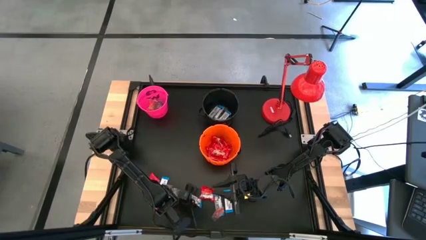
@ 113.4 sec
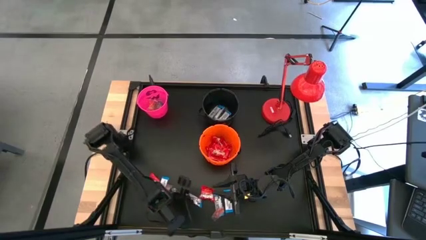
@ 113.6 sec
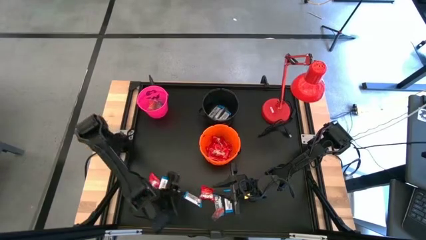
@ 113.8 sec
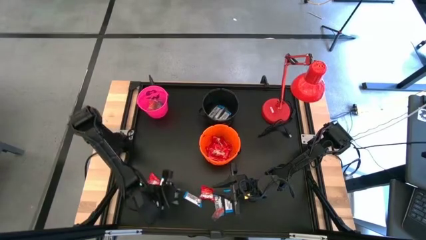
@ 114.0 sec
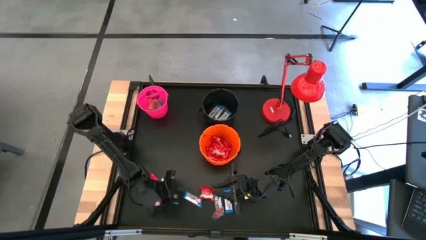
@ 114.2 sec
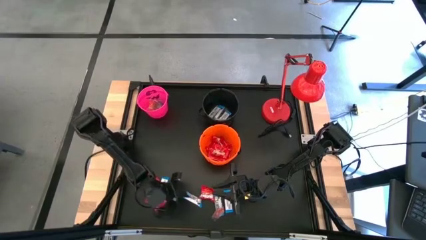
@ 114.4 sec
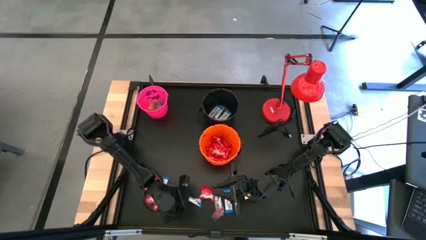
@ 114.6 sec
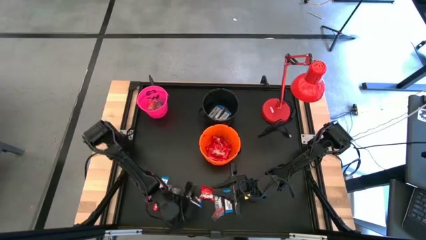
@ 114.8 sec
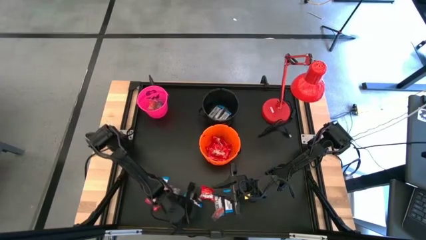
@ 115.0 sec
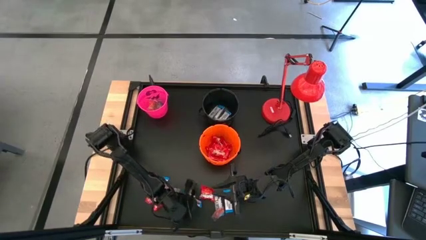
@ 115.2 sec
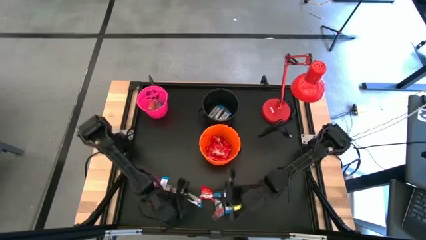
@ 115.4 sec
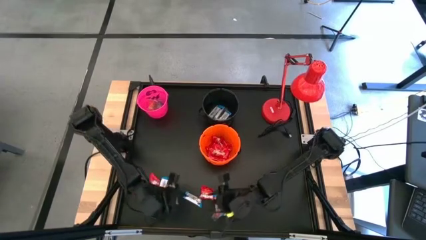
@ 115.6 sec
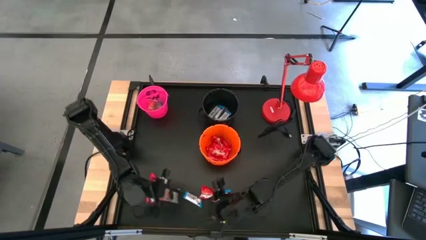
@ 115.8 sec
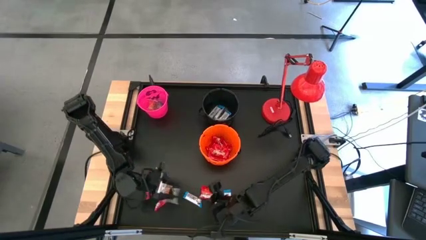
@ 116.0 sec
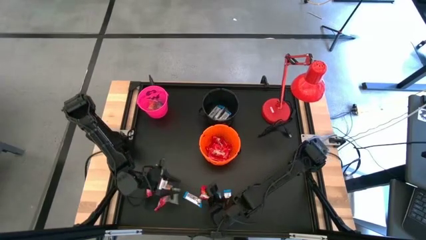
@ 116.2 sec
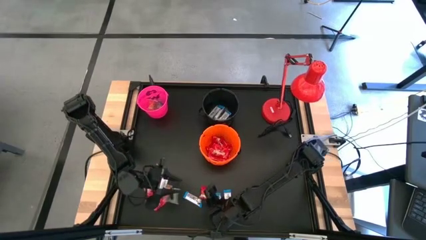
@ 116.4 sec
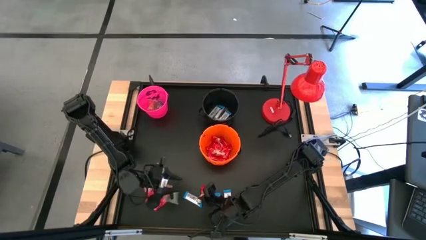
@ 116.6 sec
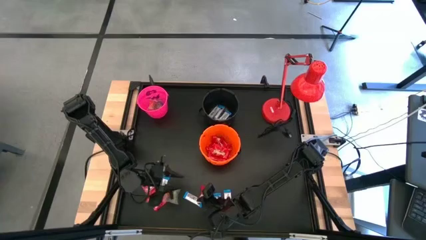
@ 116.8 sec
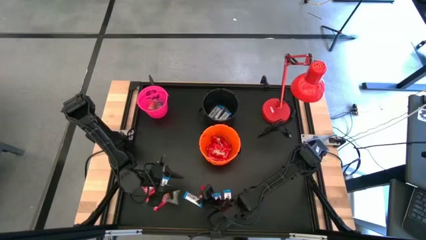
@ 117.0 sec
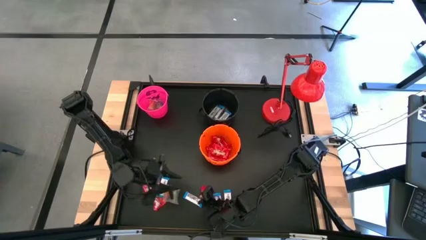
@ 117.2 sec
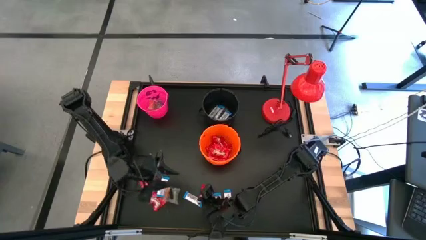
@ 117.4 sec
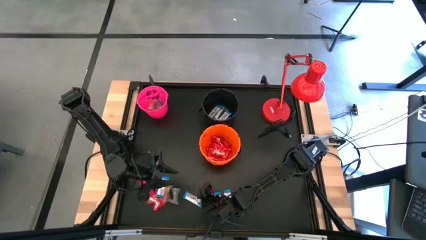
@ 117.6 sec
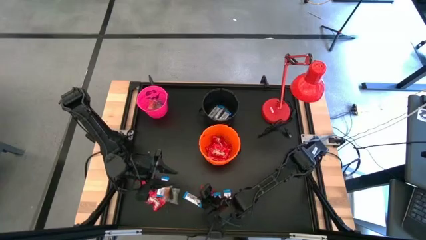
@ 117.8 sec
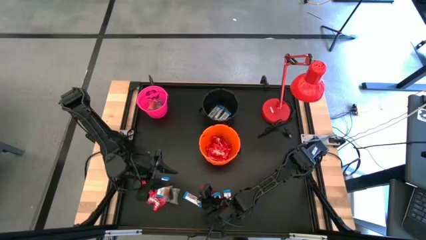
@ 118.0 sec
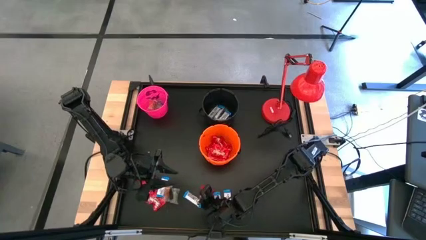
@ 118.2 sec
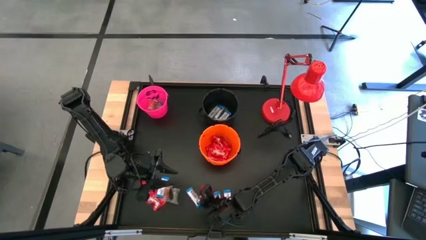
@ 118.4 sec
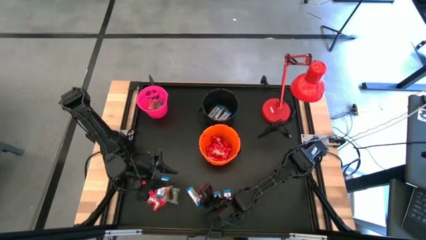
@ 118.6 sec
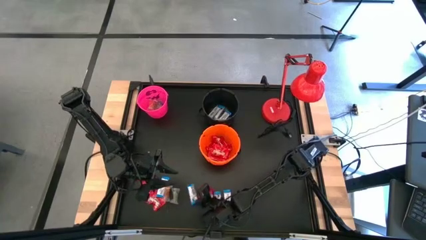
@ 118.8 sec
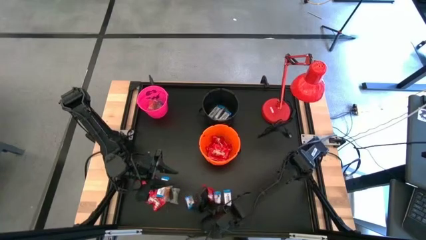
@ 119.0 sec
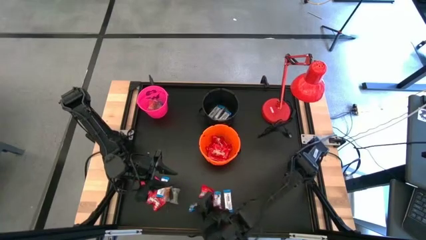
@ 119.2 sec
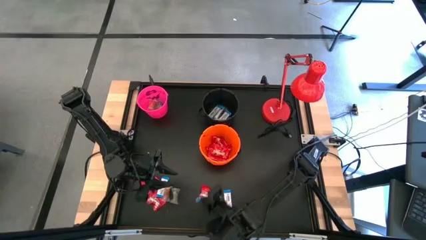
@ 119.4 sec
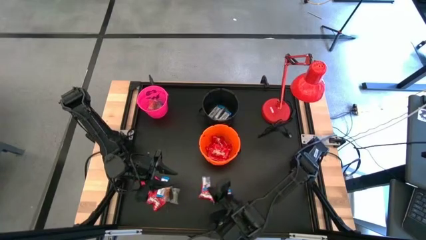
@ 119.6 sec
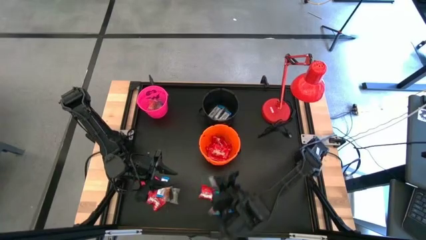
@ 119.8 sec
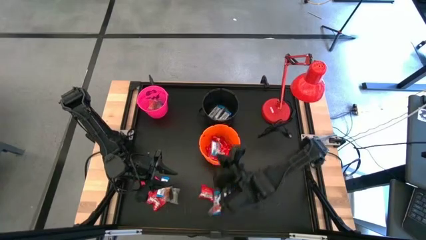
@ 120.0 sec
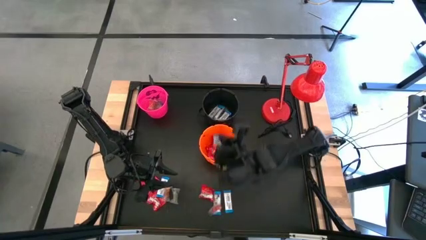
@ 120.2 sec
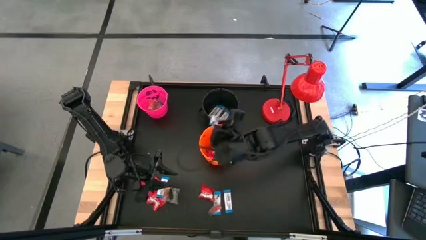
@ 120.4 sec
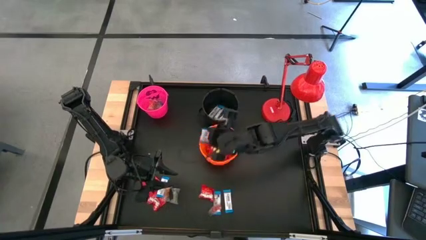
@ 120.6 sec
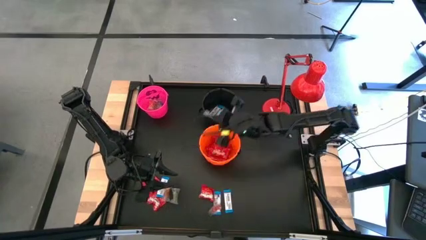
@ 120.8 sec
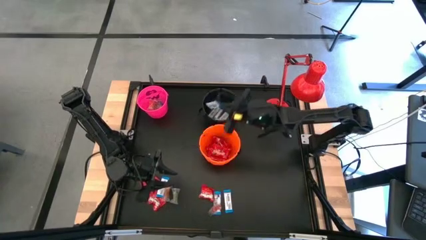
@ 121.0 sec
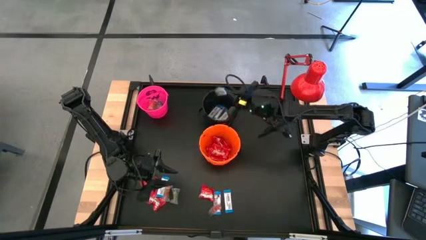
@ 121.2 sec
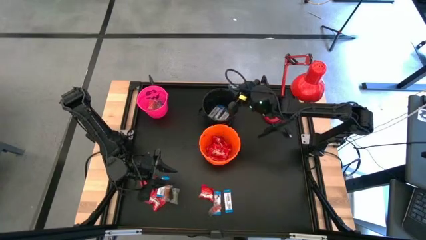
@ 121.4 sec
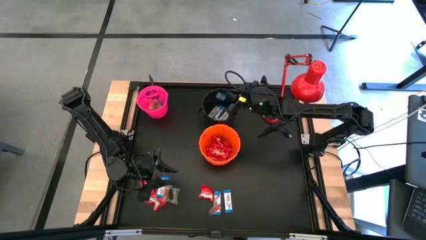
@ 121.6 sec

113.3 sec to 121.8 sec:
Task: Sort candy
Put the white chocolate into the black bucket

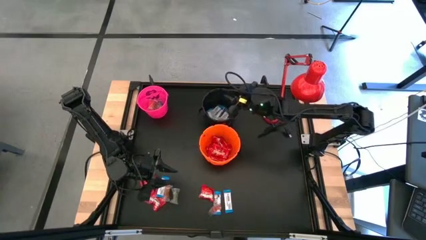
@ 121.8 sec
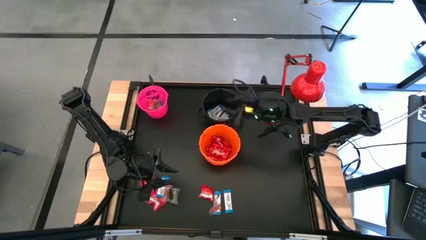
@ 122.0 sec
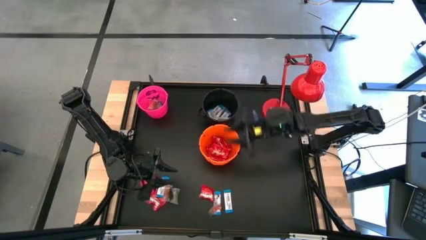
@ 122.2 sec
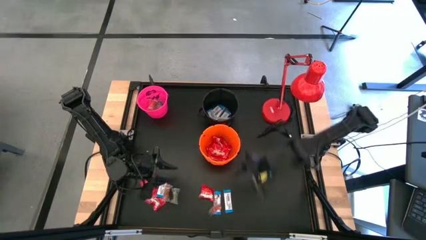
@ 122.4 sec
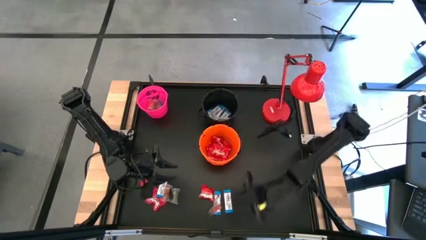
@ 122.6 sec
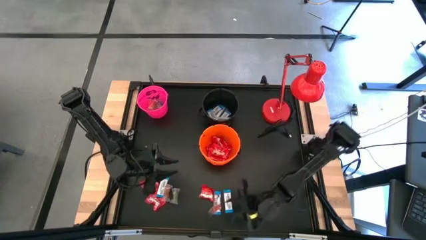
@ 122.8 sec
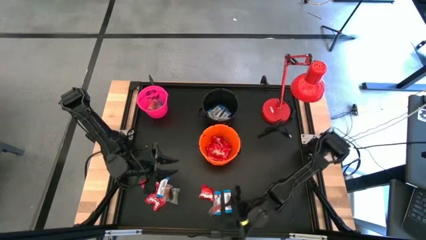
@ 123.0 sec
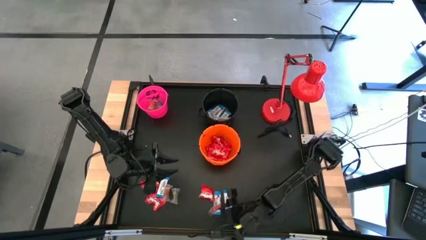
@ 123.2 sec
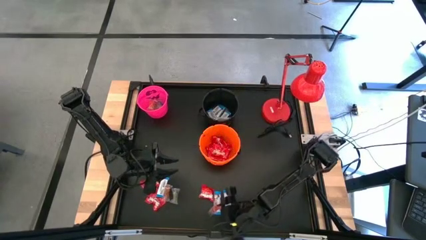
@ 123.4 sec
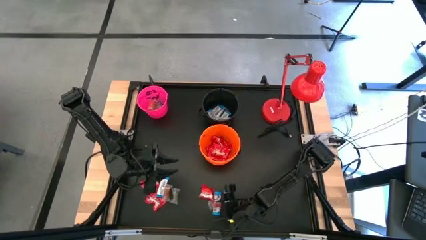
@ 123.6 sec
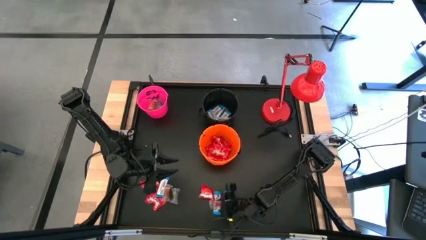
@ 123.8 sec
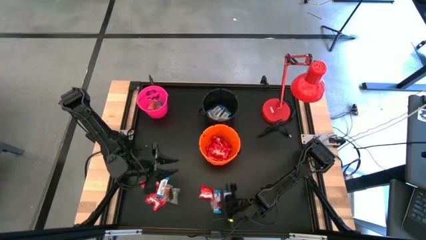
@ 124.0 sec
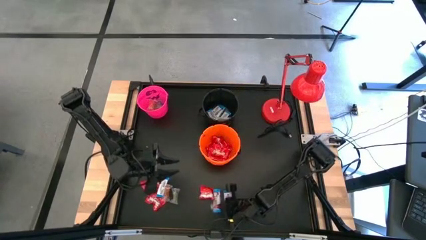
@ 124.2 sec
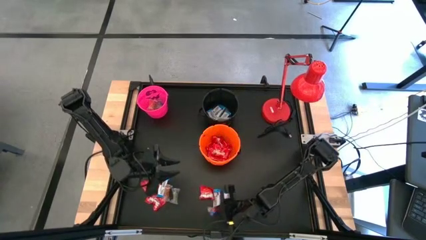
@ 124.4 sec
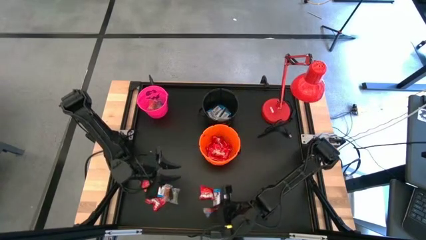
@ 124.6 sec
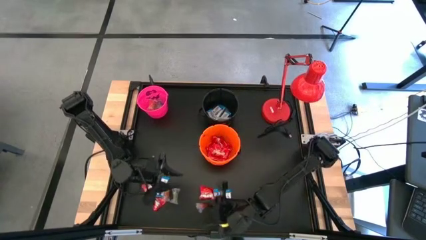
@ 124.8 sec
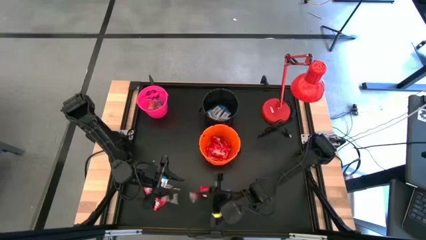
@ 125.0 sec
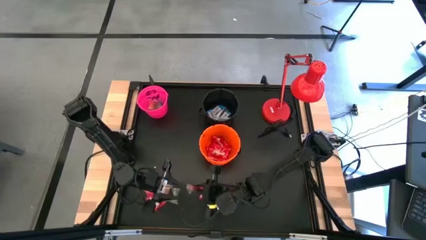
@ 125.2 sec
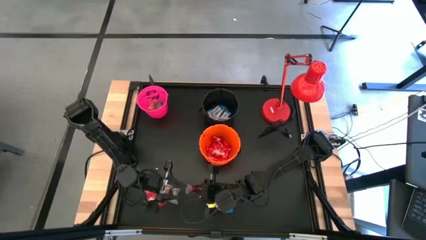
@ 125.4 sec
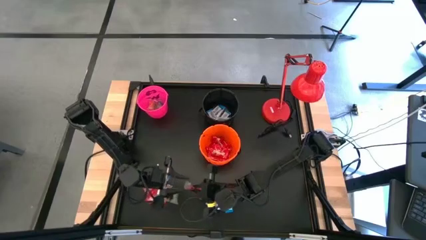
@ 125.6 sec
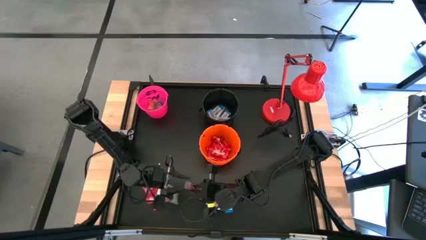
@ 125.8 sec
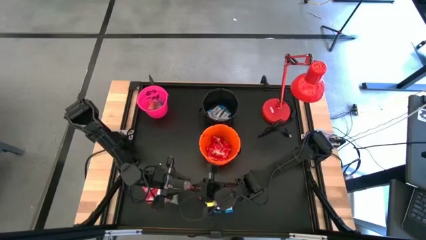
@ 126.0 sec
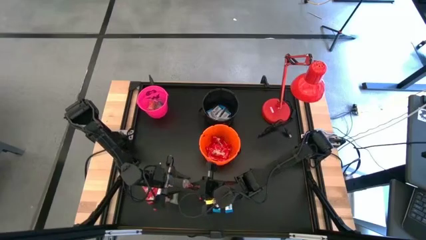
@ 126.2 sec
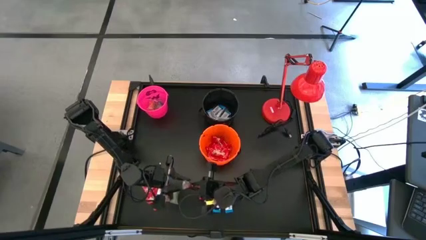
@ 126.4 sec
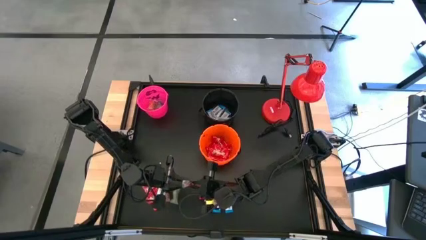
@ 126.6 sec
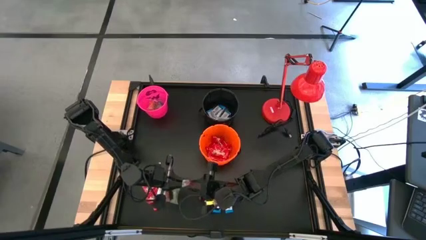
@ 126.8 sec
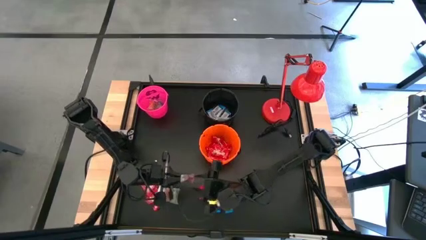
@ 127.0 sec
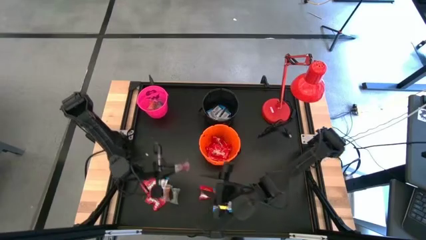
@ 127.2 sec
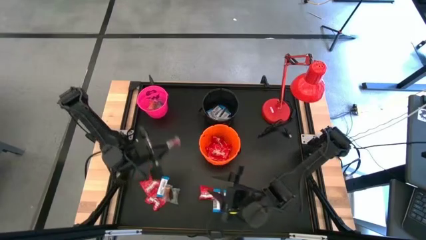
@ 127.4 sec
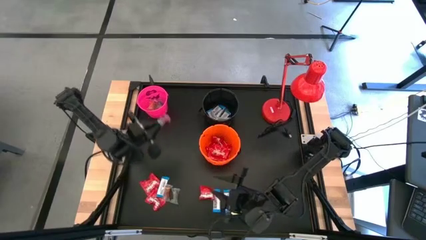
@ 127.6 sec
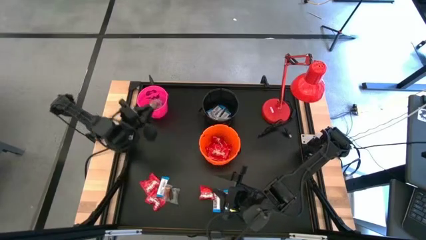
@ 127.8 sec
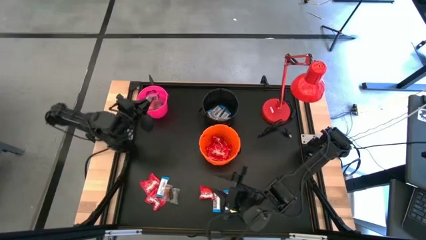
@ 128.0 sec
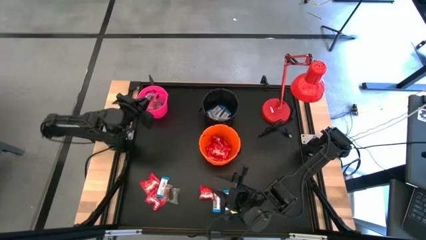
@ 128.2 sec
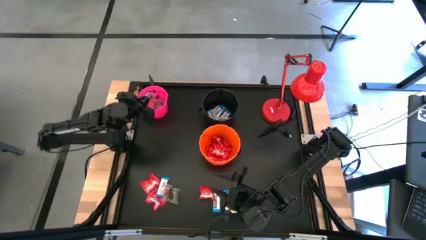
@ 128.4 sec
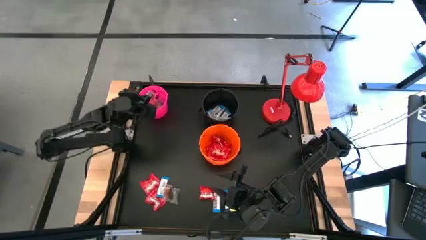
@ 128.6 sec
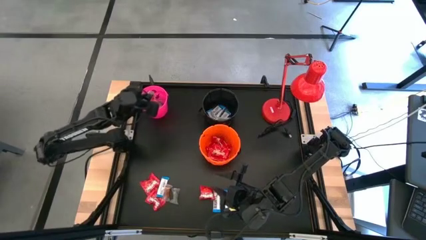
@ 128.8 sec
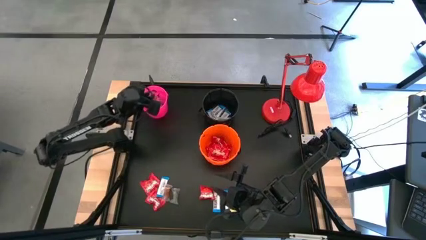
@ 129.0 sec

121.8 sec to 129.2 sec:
Put the orange gummy into the pink bucket

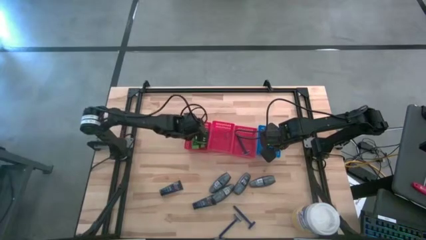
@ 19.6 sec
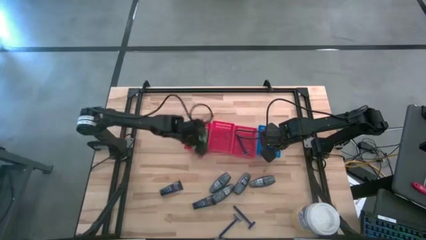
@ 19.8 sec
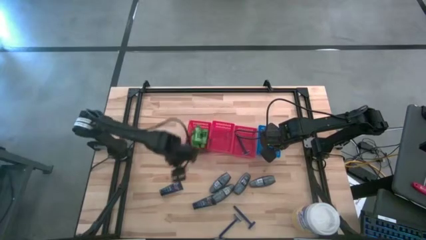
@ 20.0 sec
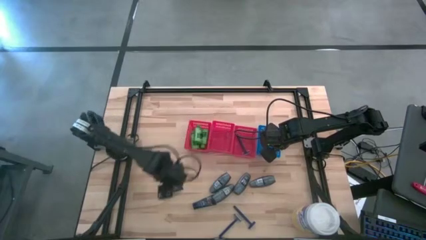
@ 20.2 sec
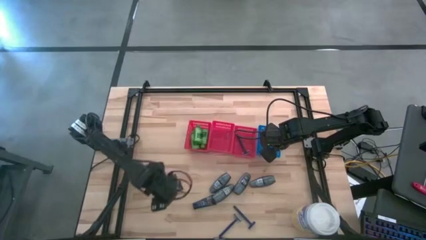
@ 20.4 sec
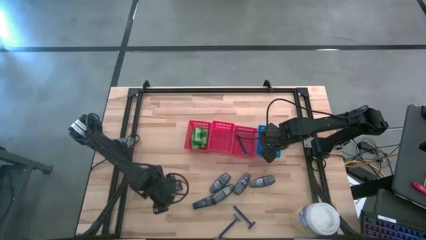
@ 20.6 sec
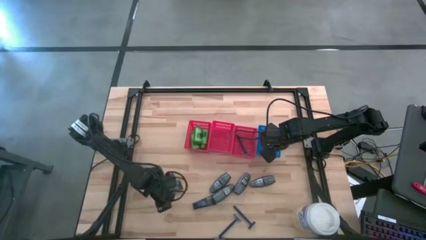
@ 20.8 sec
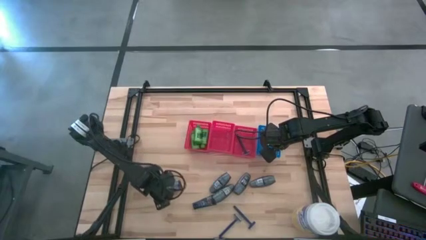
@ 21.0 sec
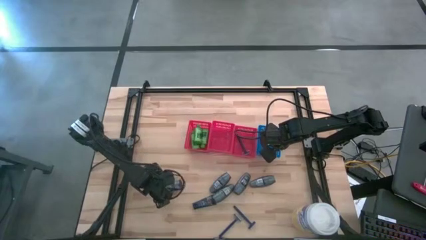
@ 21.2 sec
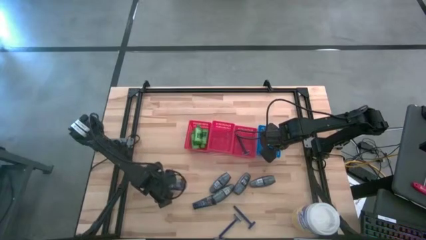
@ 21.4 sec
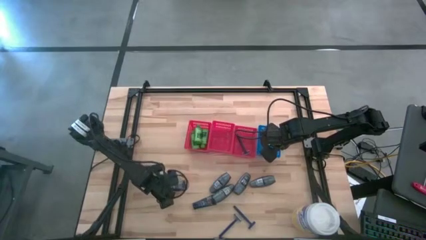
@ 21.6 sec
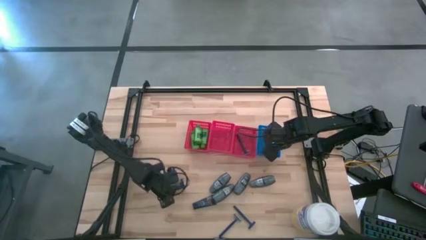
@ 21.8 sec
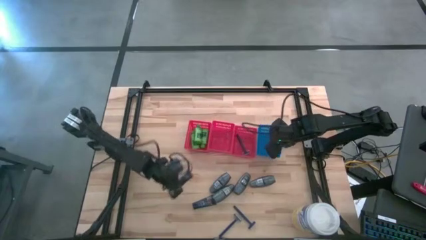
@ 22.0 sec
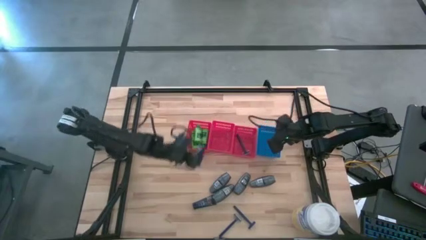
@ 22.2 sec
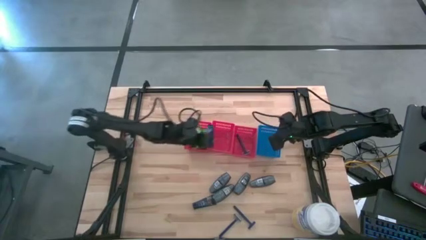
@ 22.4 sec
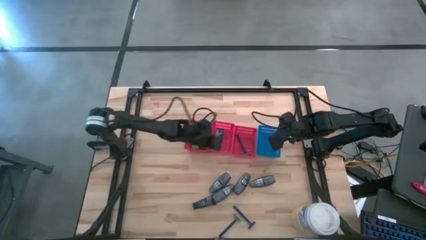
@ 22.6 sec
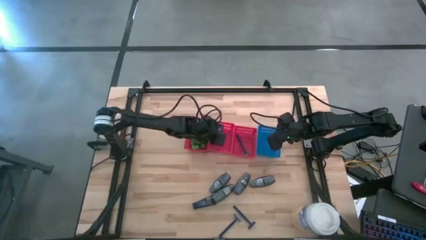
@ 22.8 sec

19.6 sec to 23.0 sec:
Task: Pick & Place Travel size toiletries
Put the blue shave cream in the middle red bin
